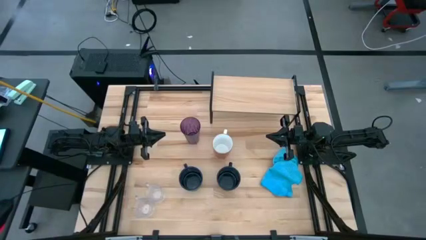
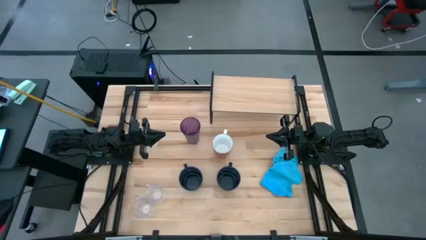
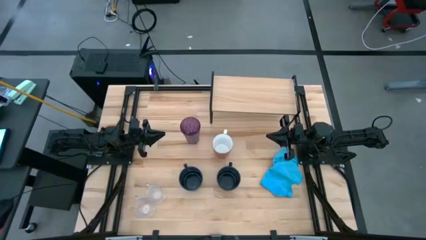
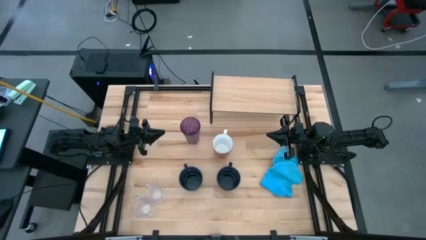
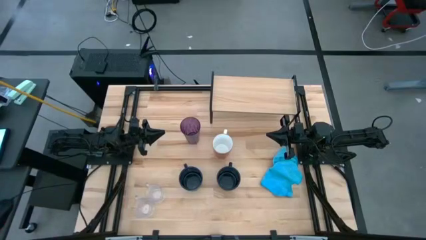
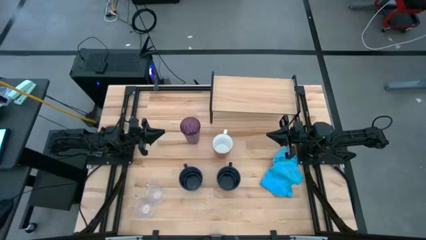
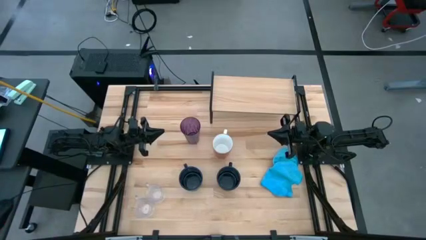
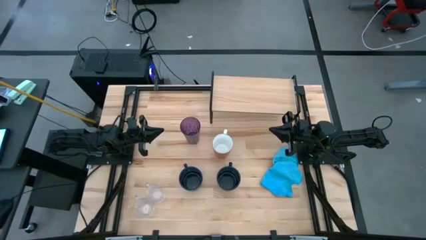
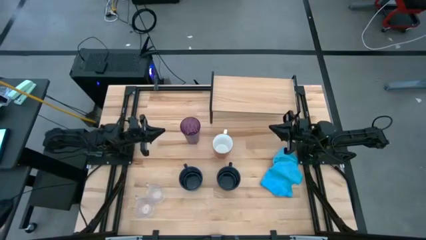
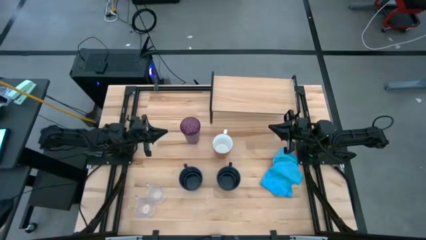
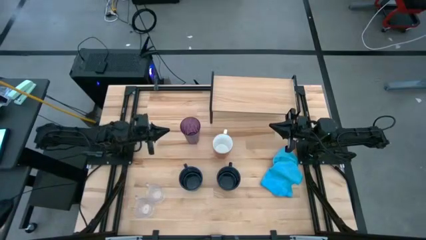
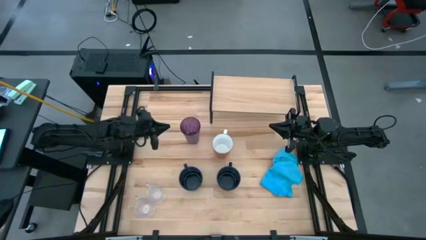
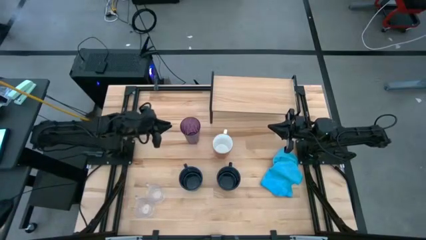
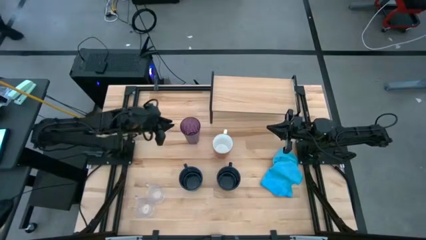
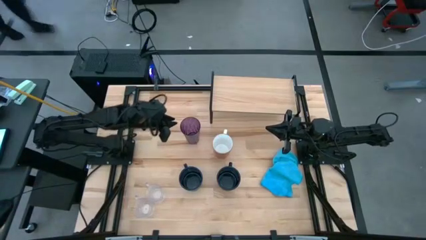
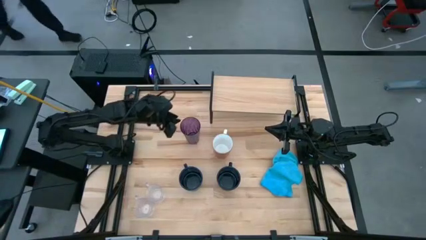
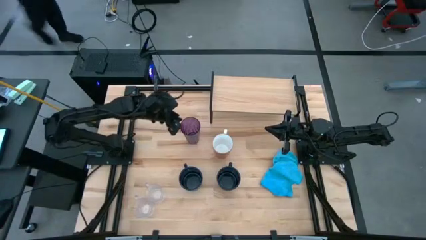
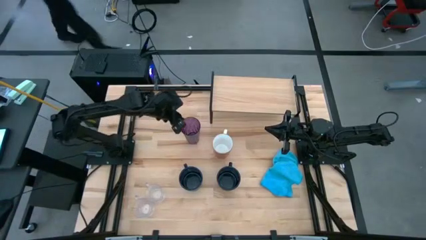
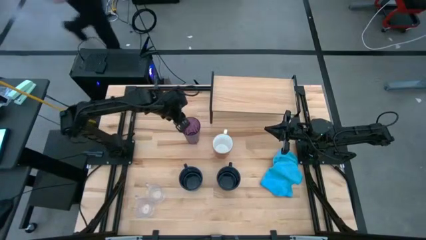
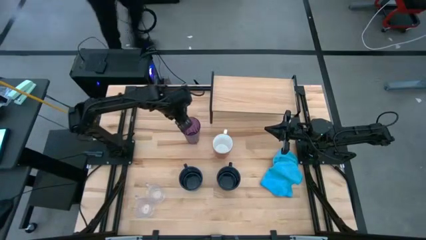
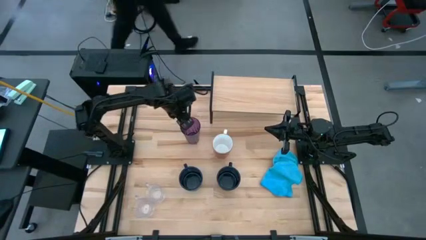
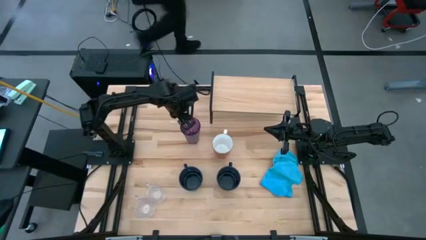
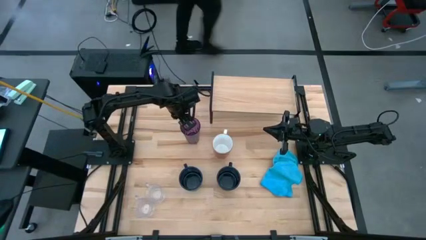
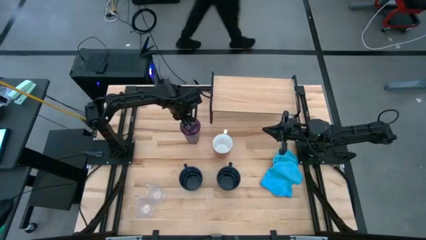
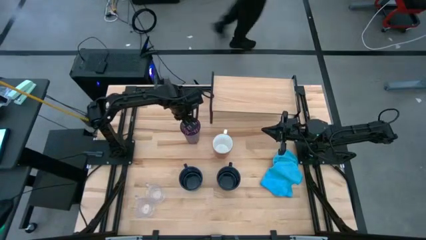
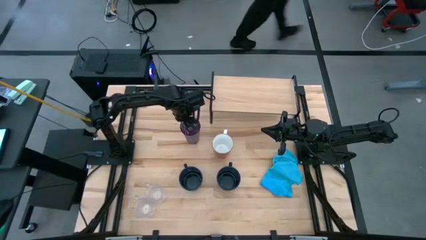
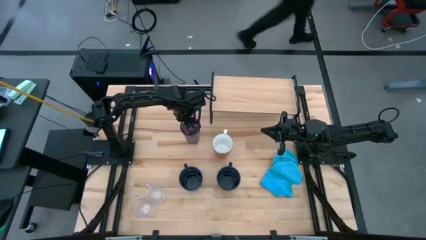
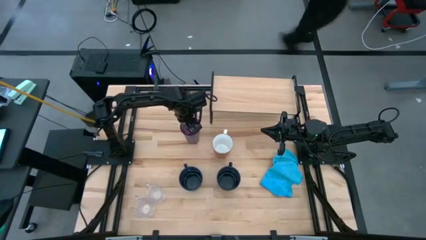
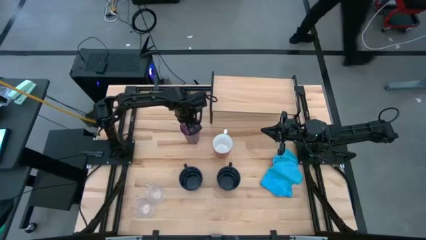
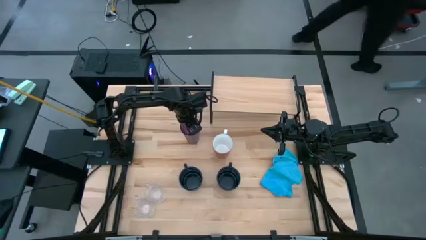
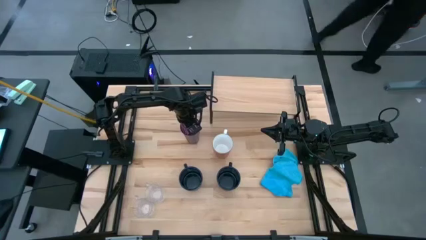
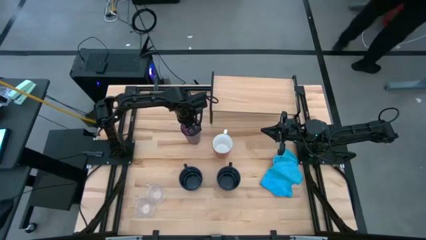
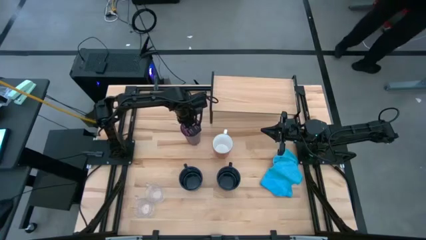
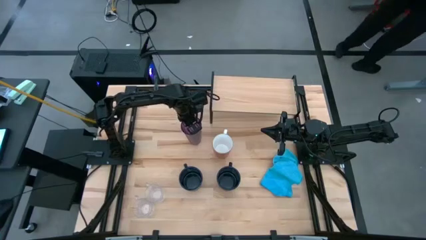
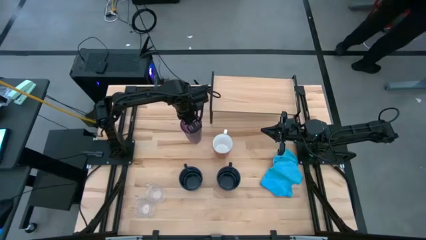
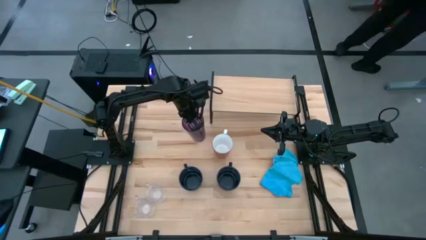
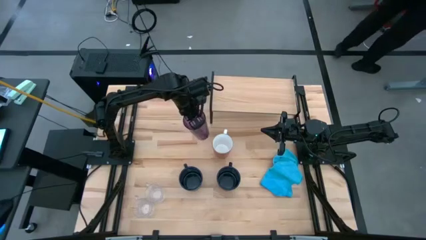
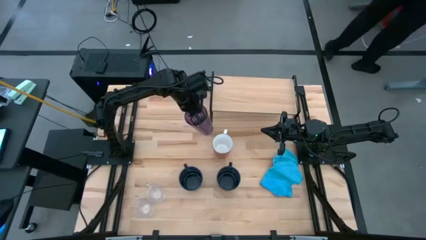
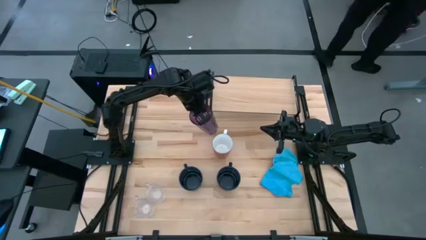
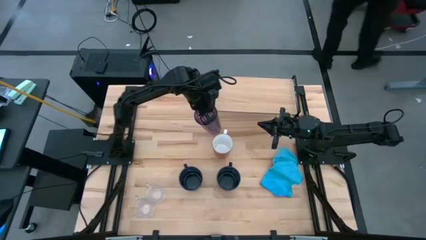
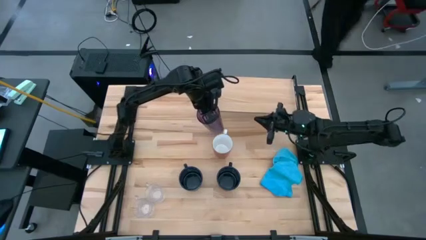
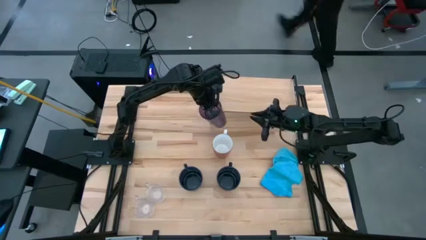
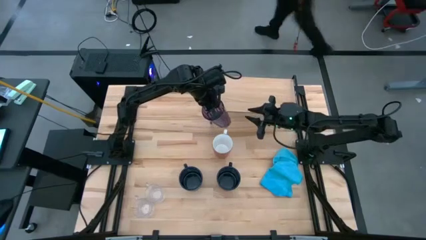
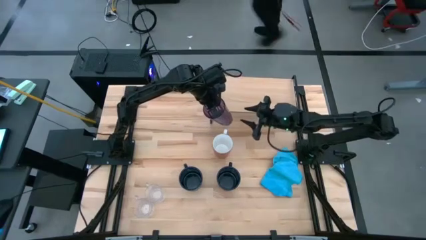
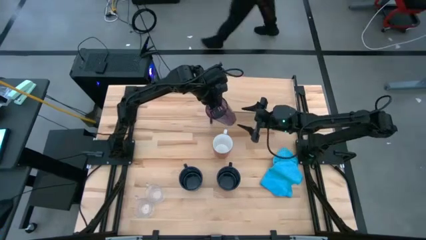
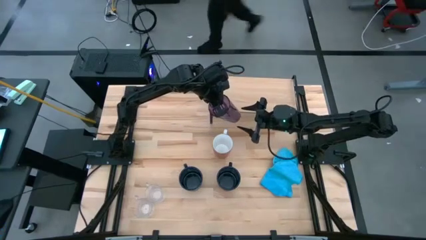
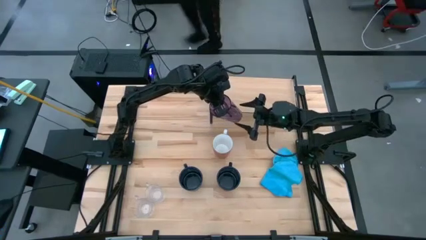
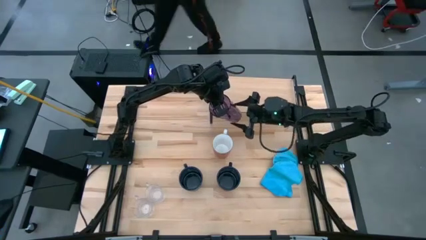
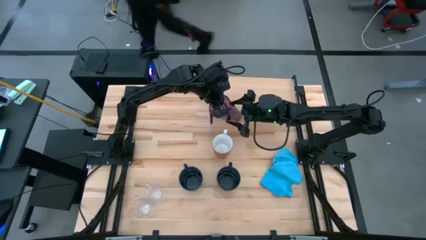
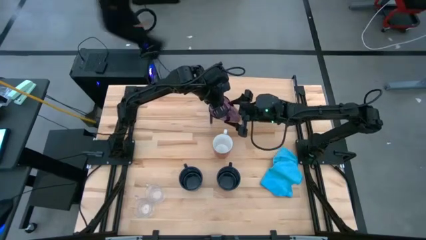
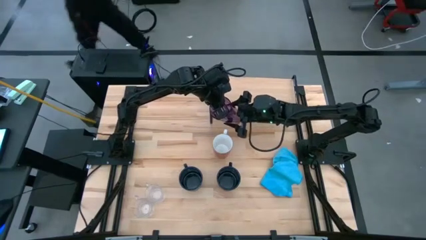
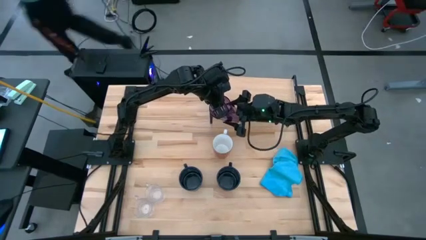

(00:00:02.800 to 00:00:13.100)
Task: Stack small to large cups/mugs on shelf
Put the purple cup on the shelf
